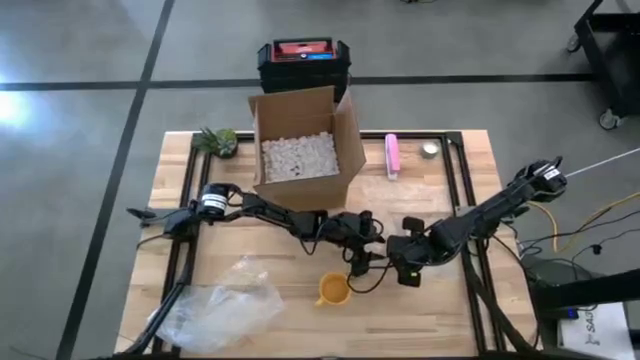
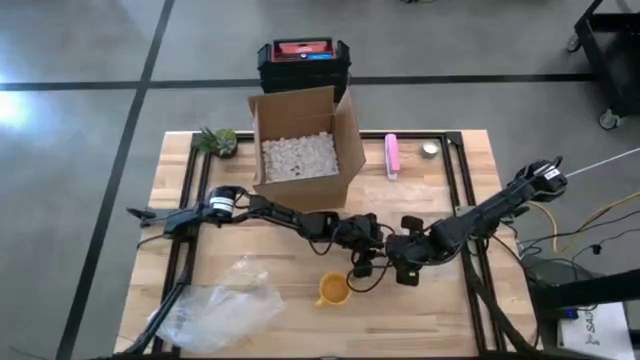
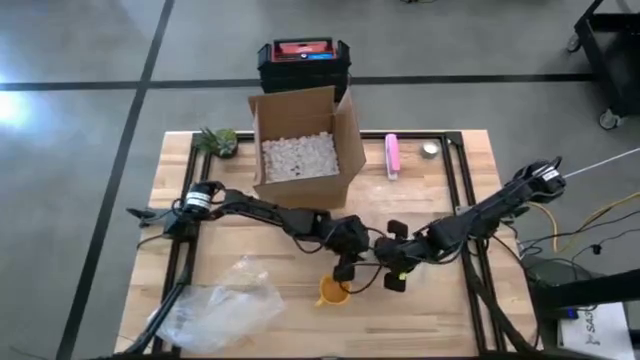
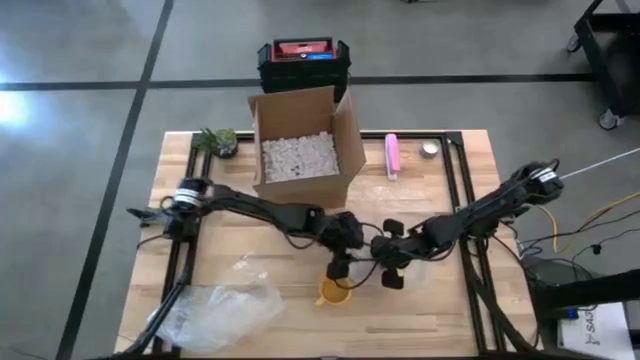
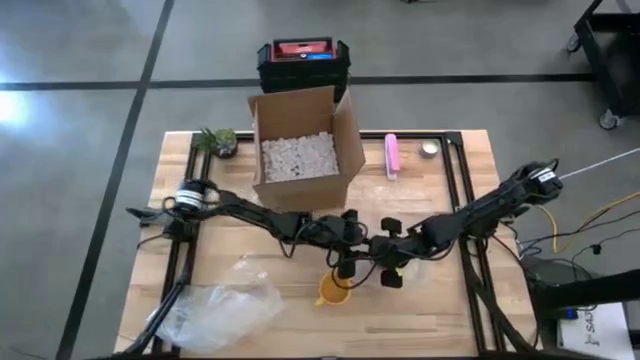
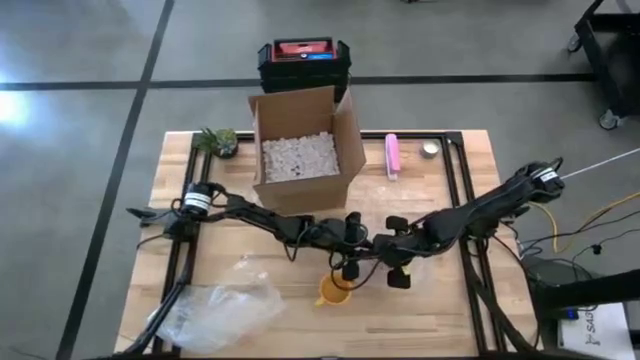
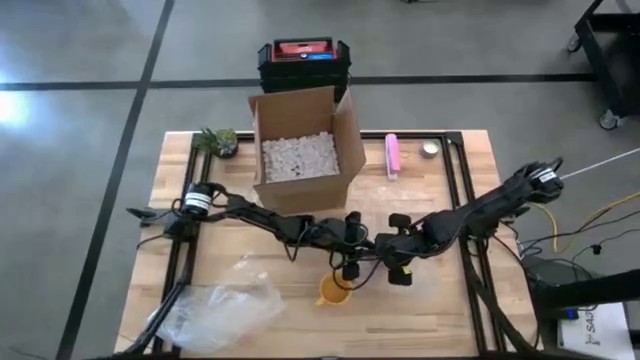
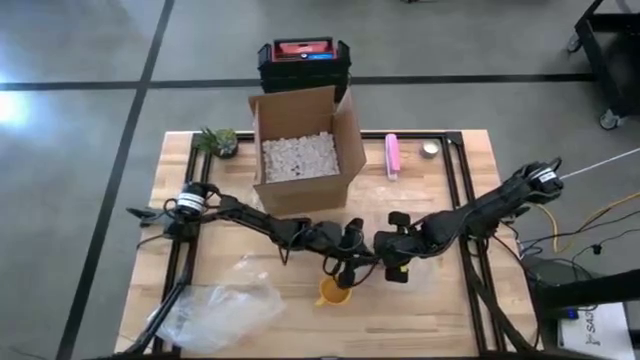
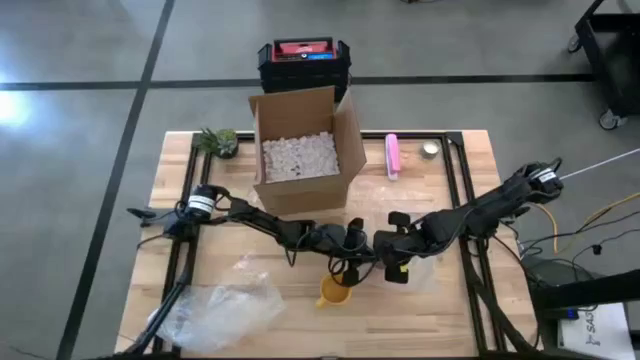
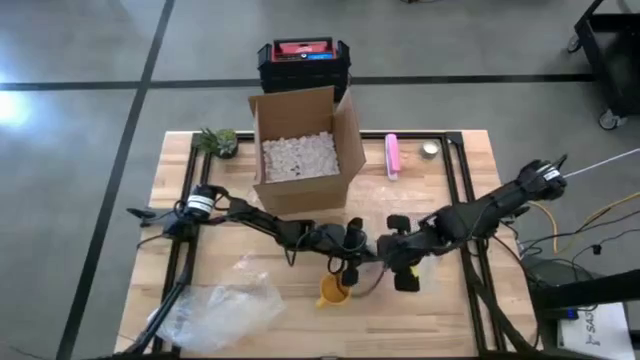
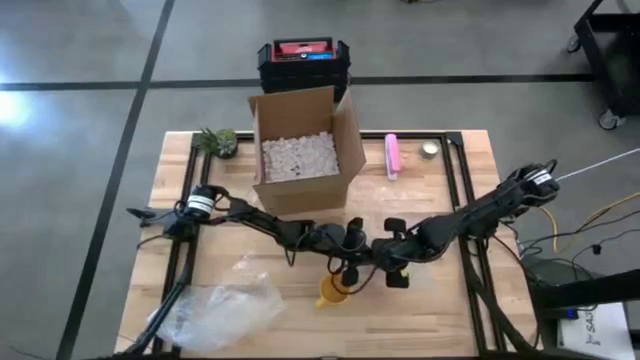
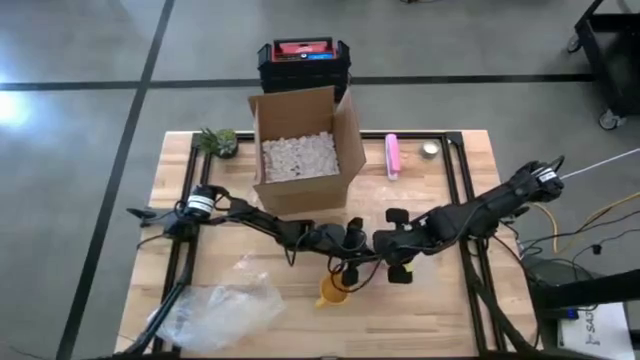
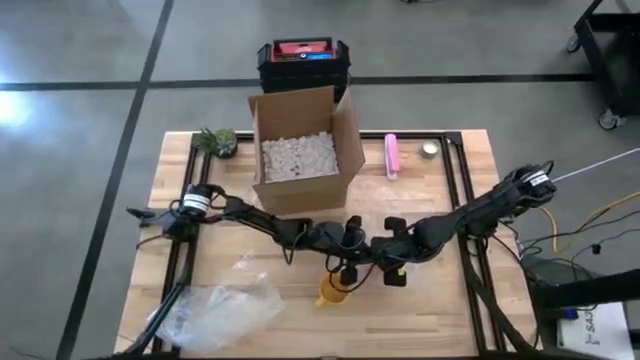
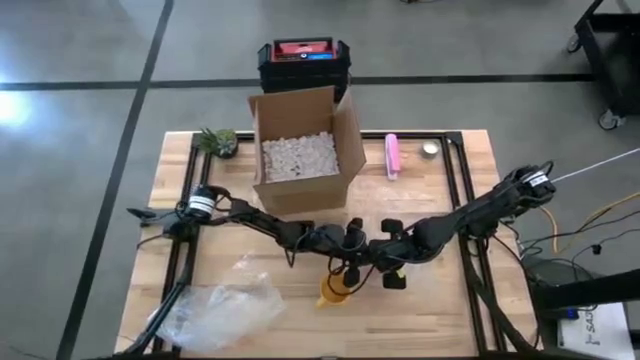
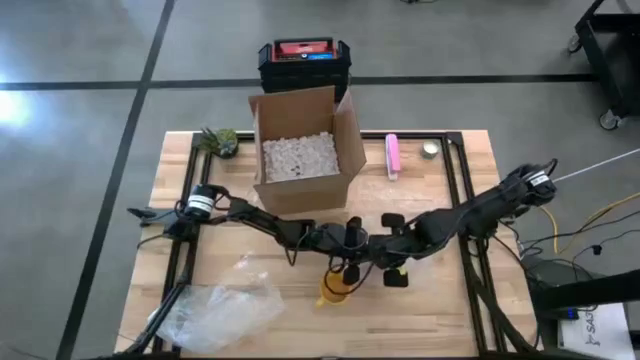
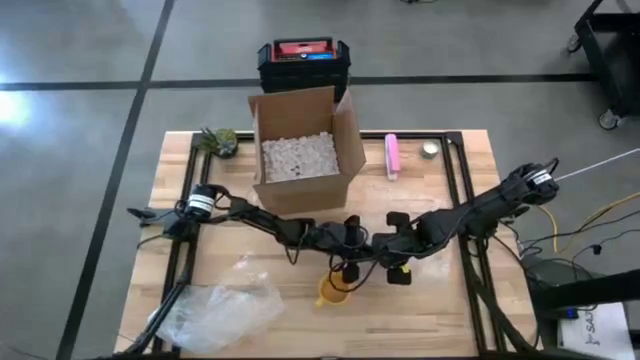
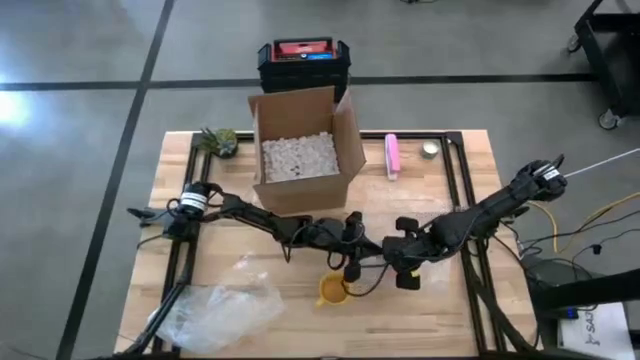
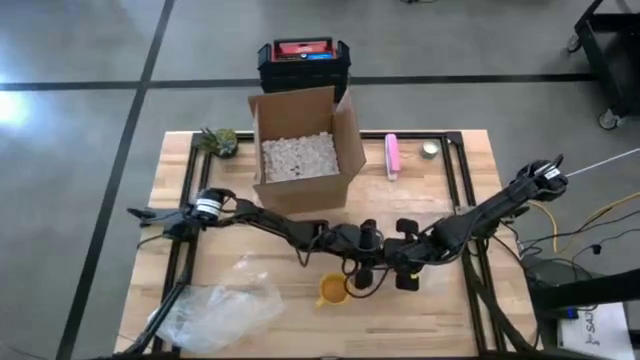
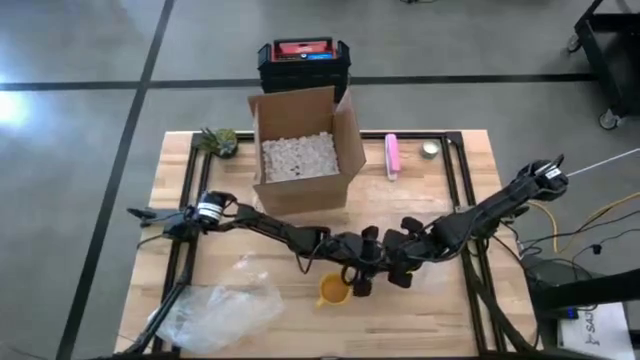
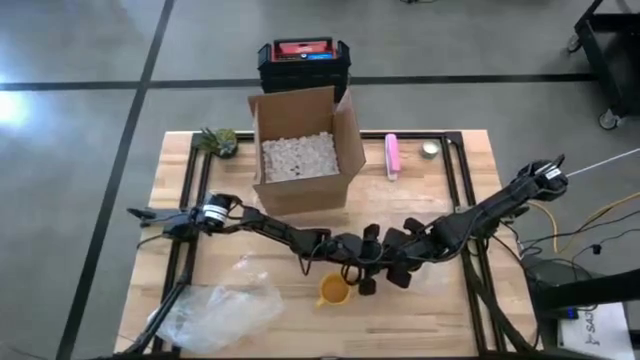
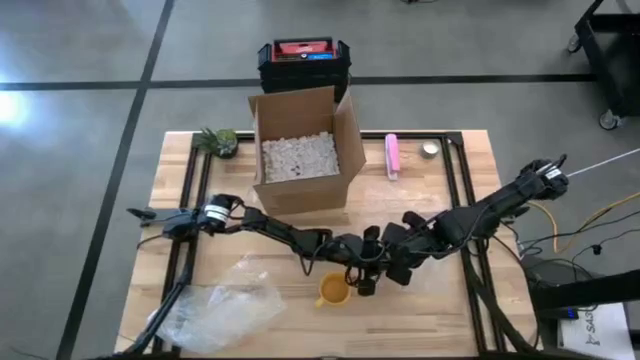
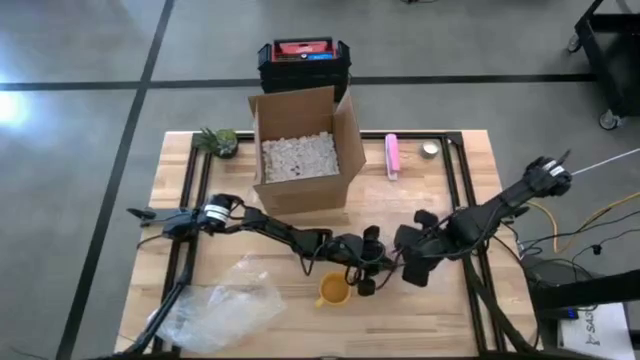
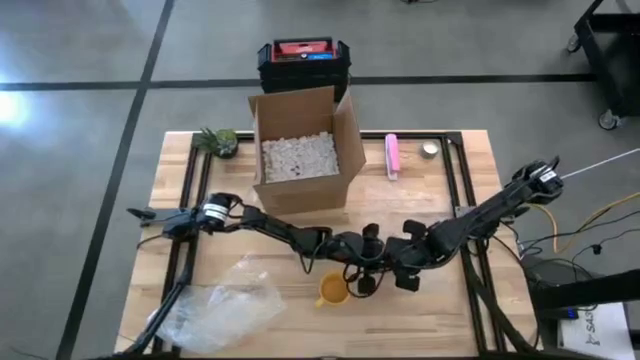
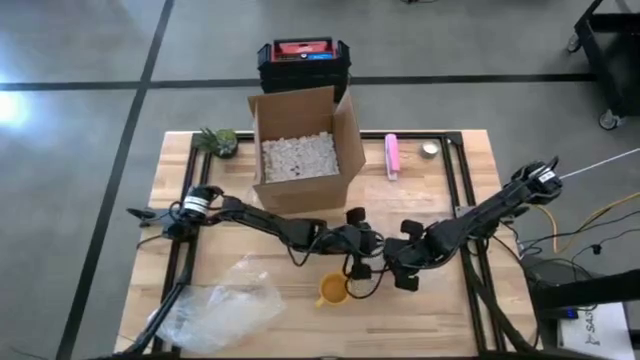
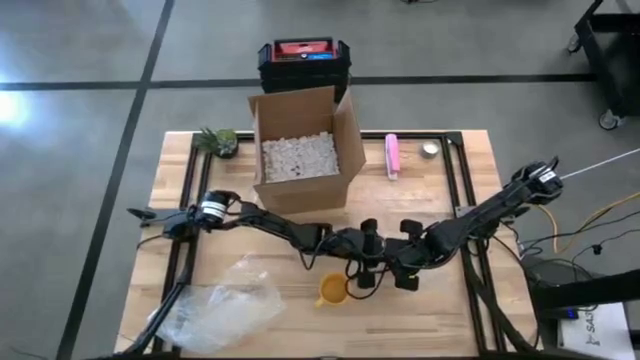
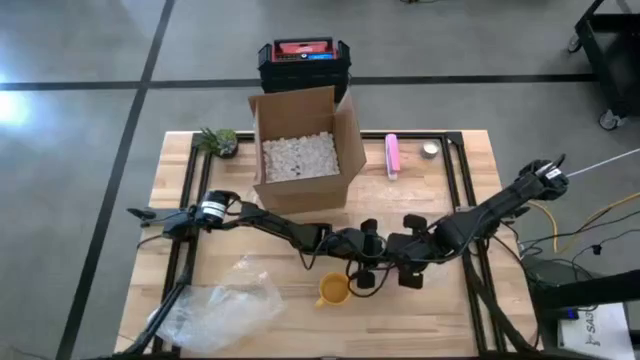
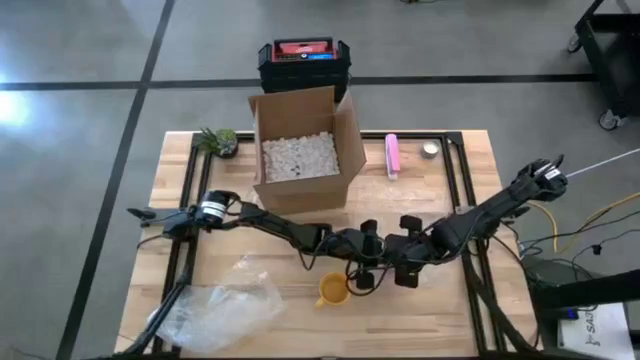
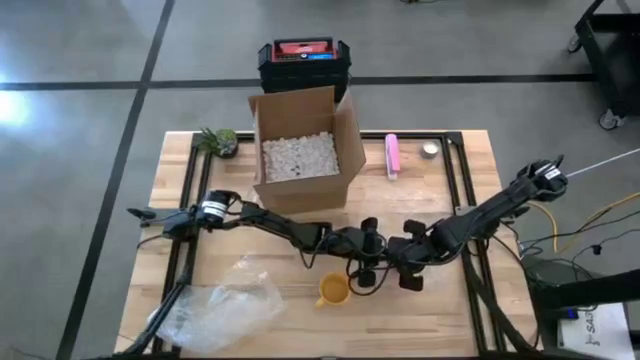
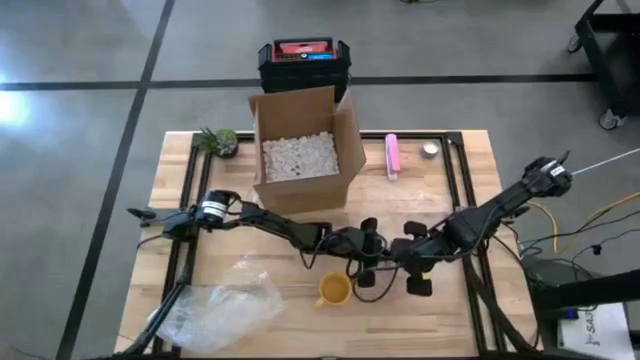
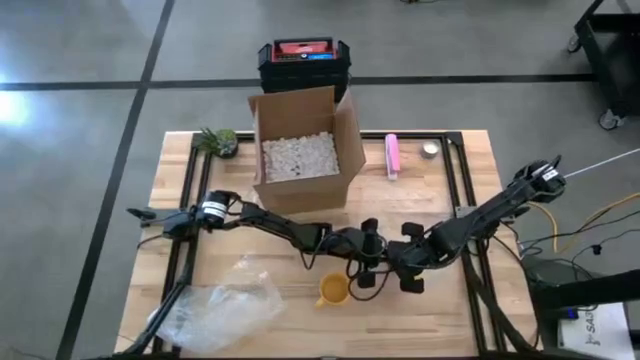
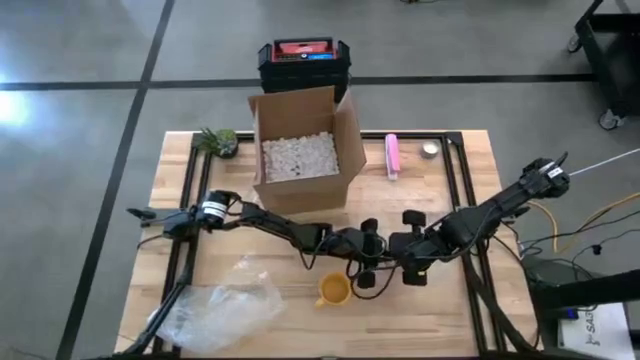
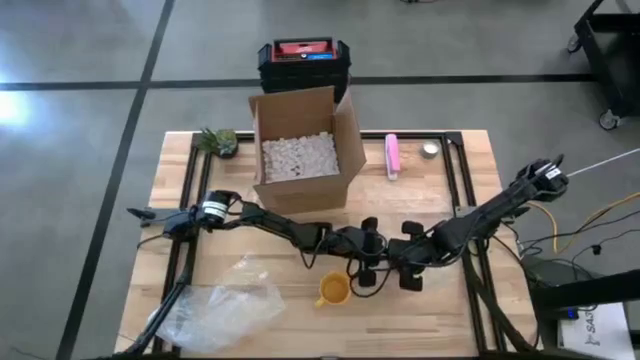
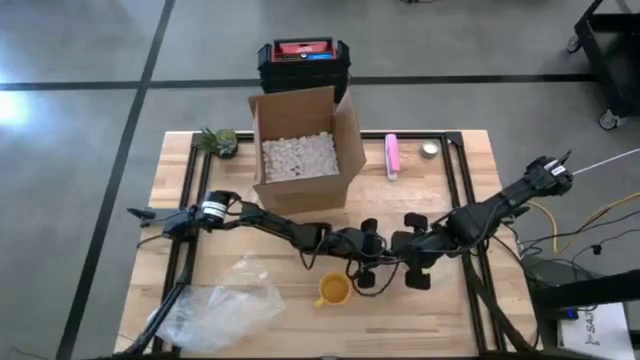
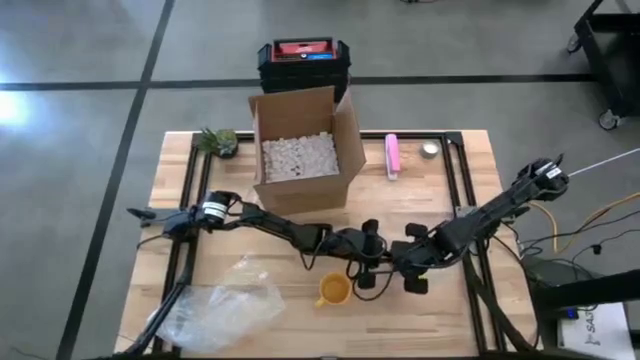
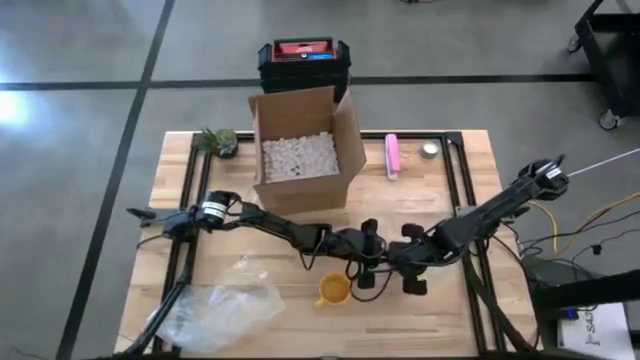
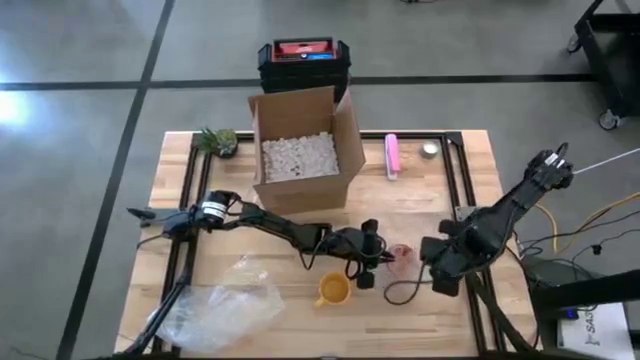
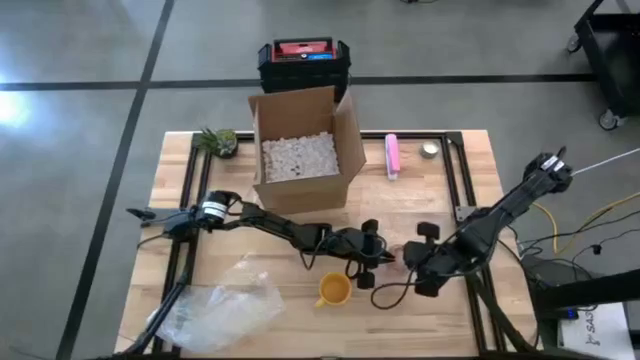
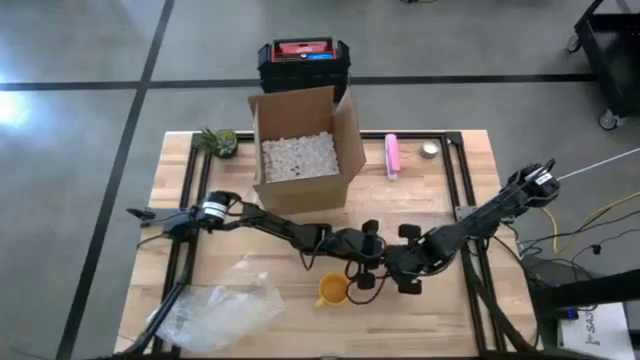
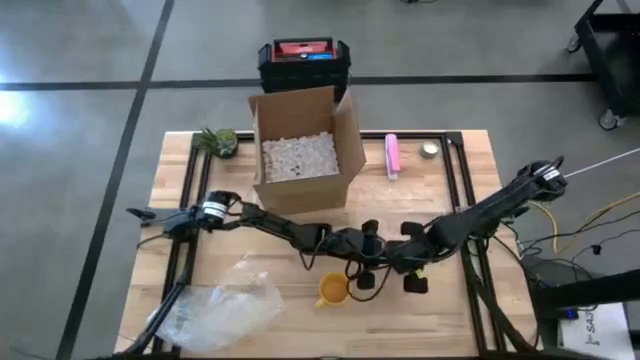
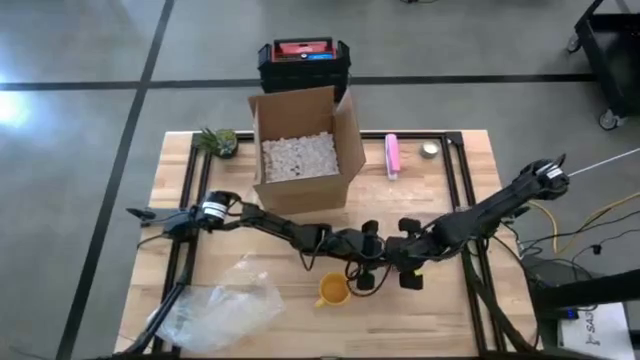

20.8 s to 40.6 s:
Task: wrap mug
Wrap the orange mug in the right transparent bubble wrap

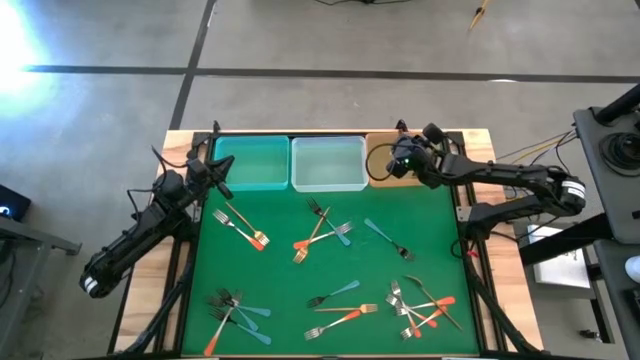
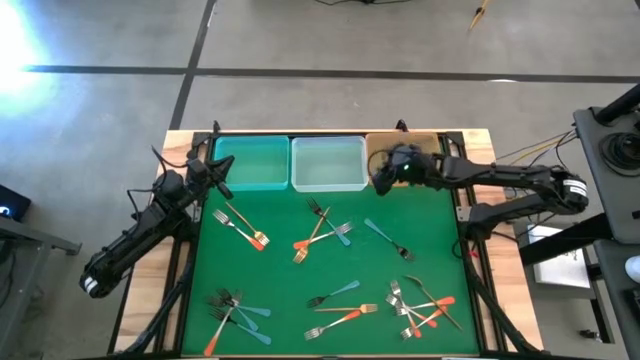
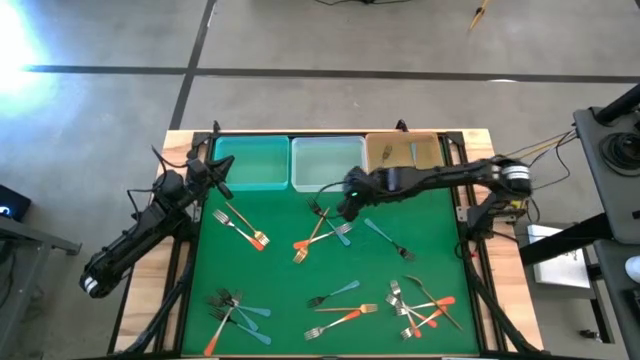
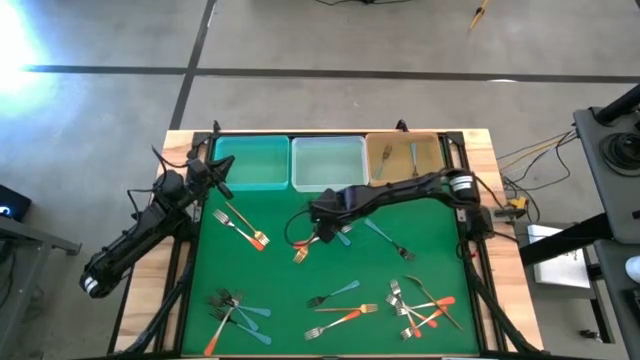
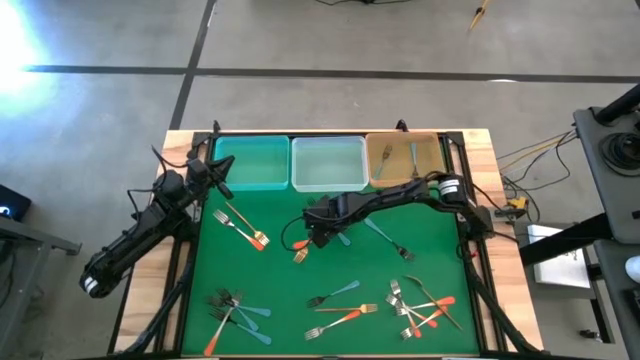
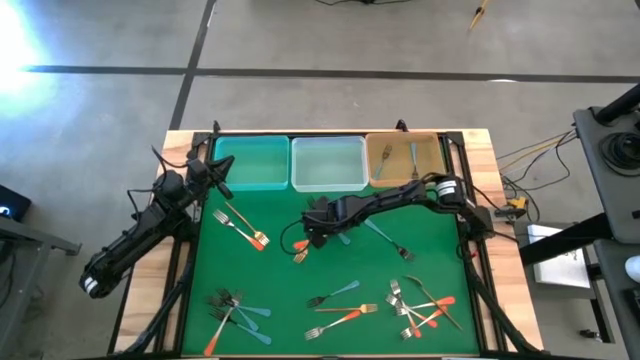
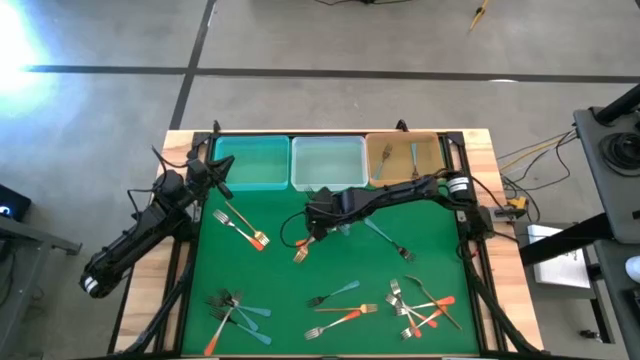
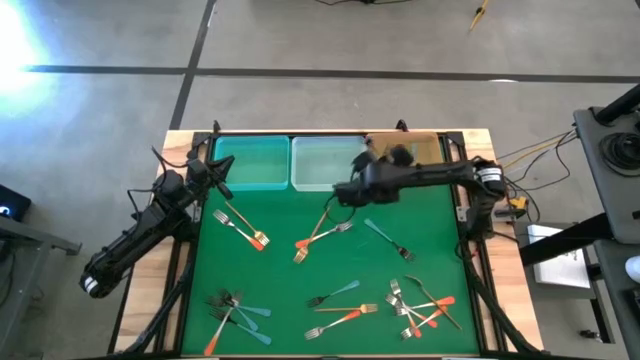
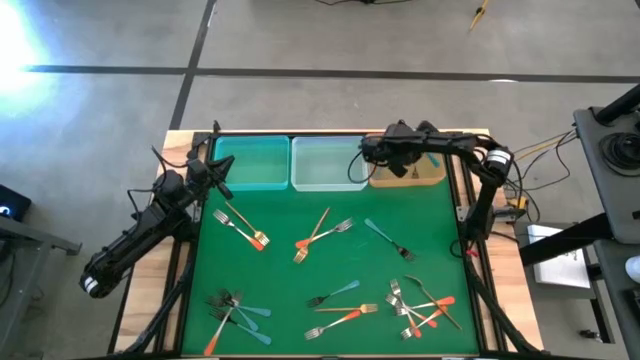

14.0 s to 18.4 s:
Task: Sort silverware by color (type)
Put the blue fork into the orange bin
